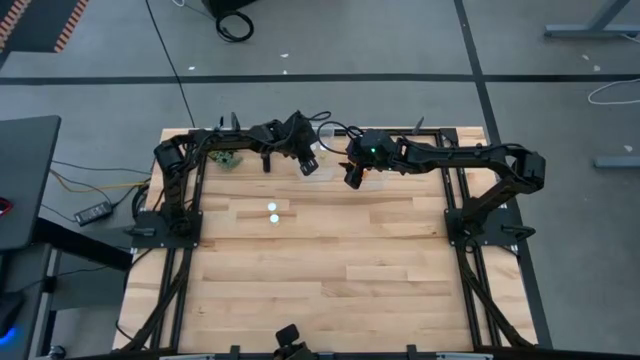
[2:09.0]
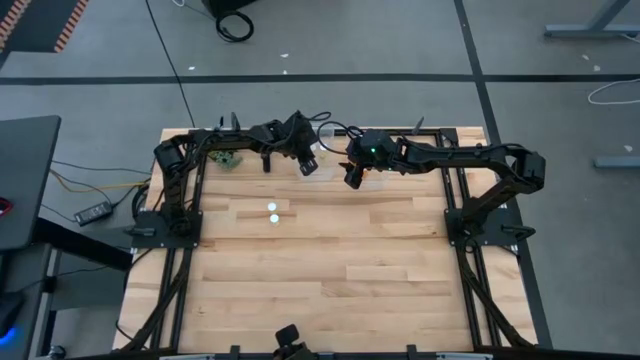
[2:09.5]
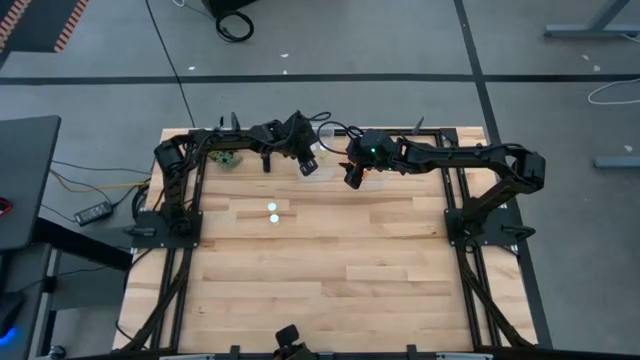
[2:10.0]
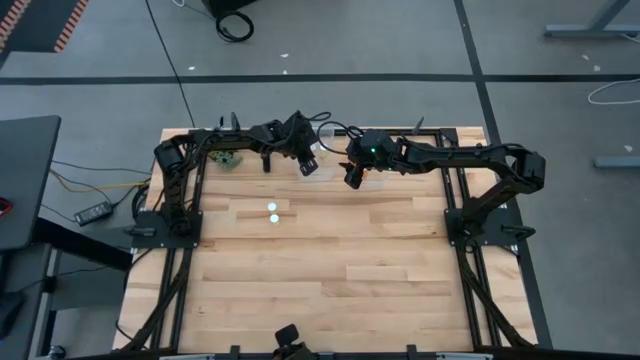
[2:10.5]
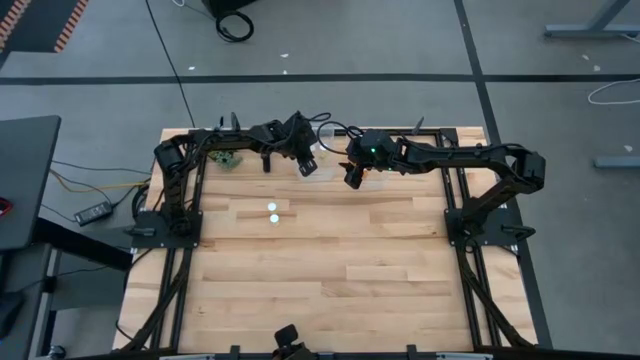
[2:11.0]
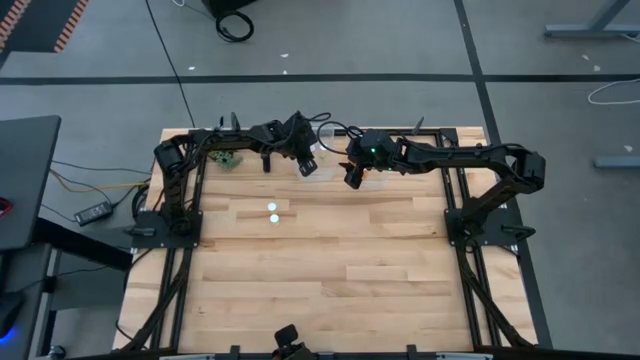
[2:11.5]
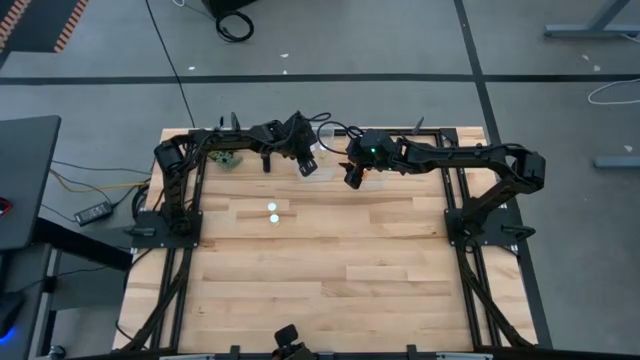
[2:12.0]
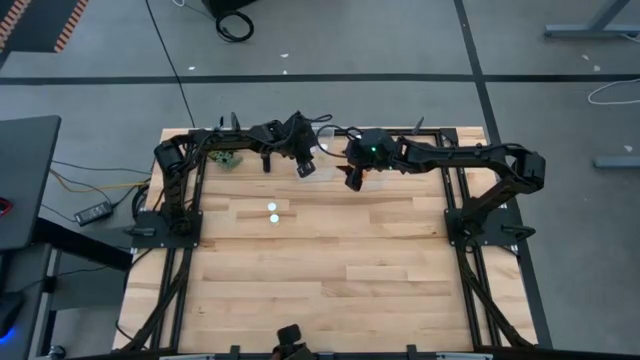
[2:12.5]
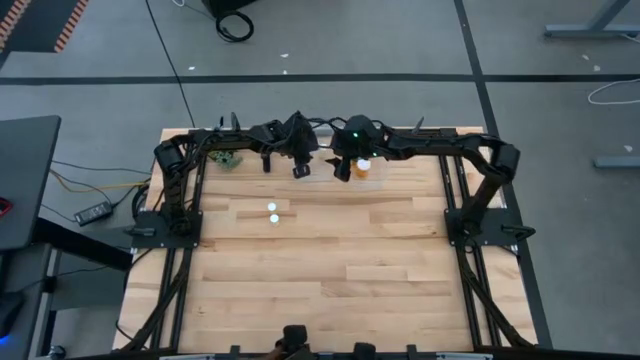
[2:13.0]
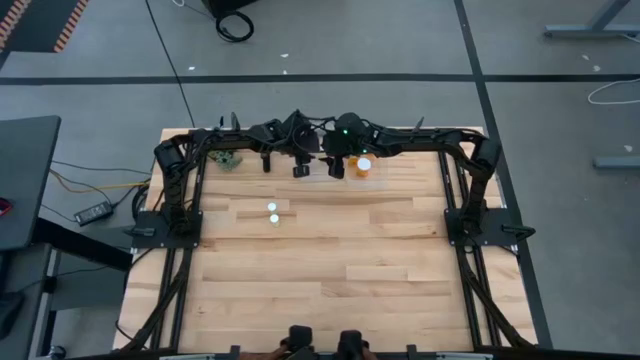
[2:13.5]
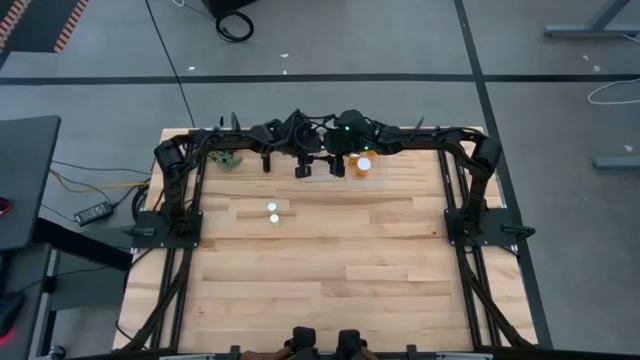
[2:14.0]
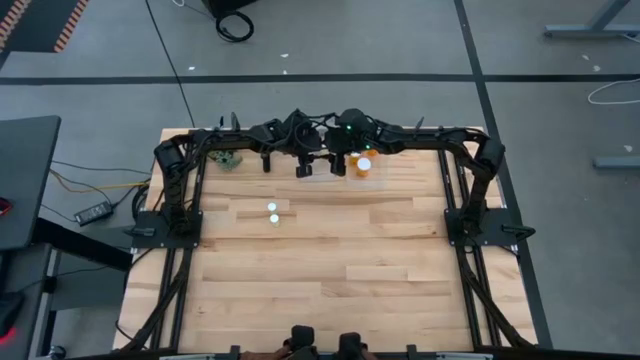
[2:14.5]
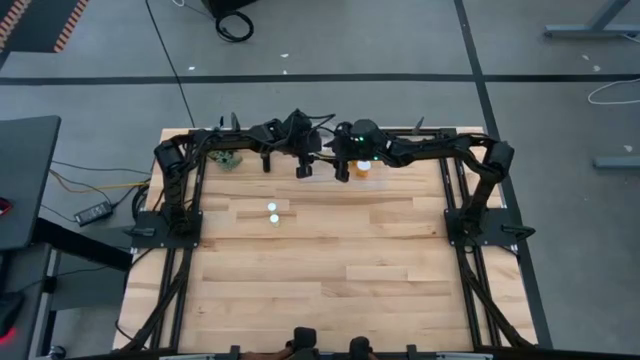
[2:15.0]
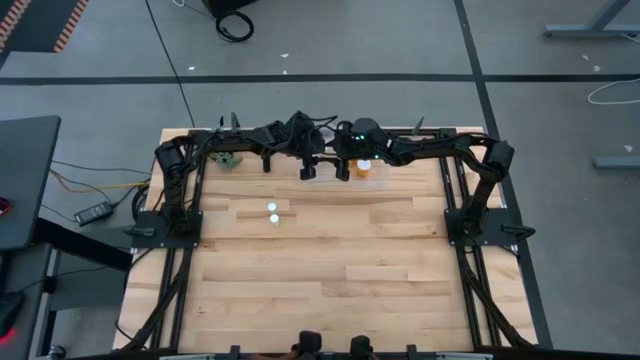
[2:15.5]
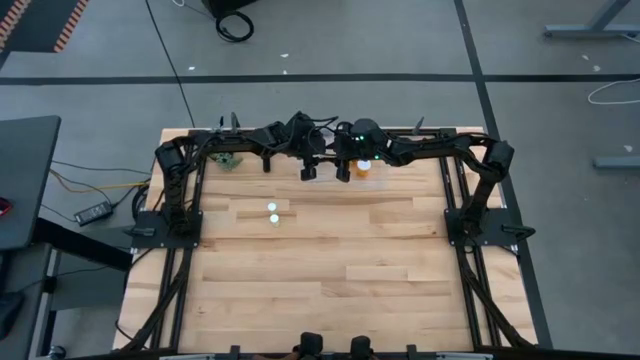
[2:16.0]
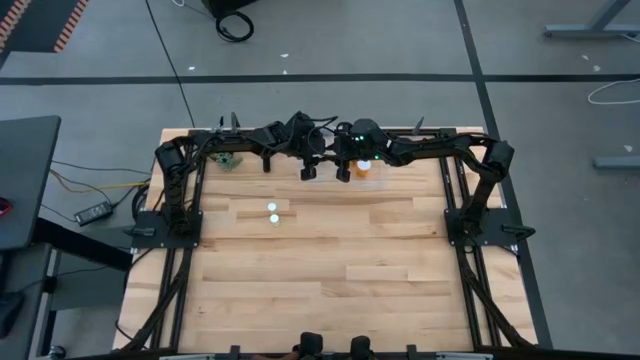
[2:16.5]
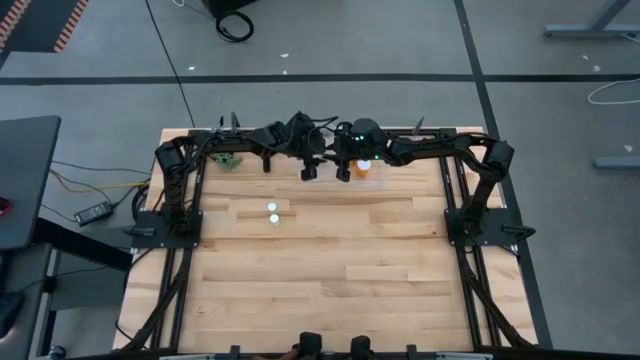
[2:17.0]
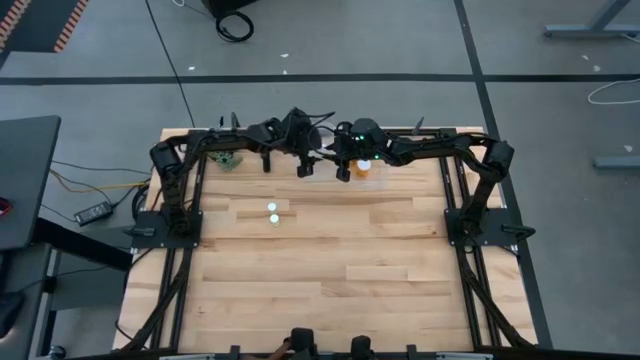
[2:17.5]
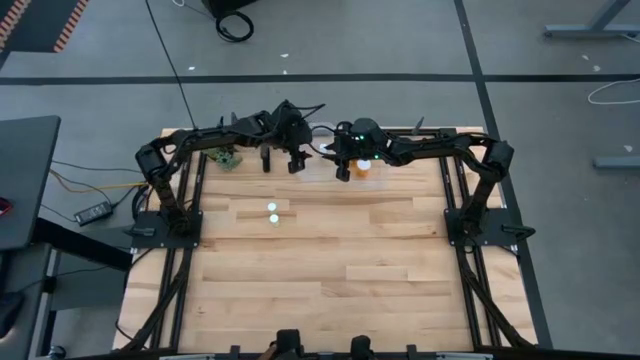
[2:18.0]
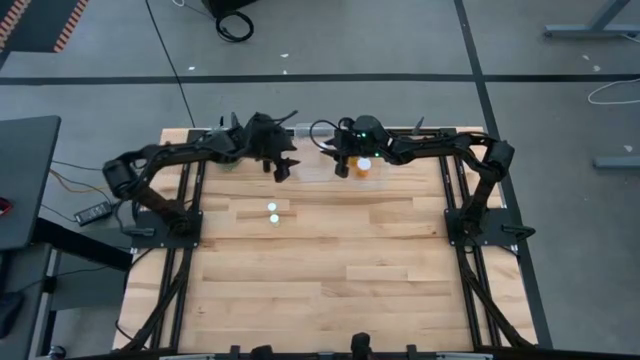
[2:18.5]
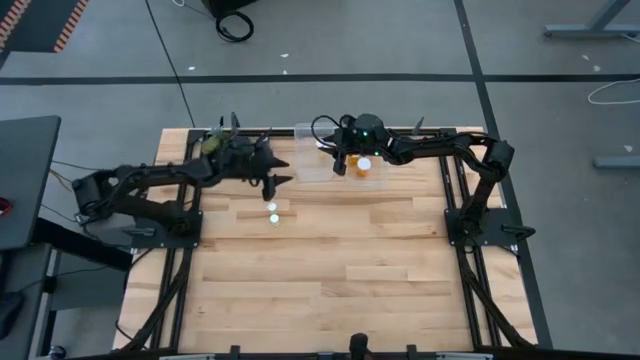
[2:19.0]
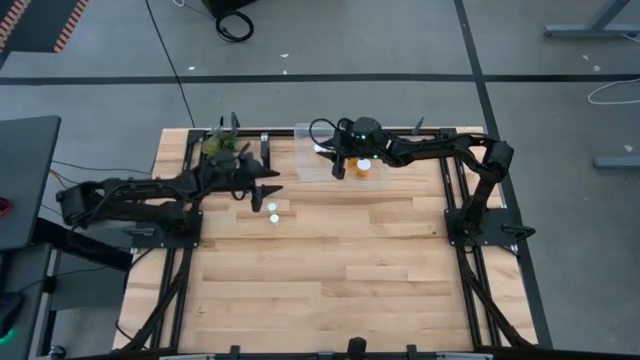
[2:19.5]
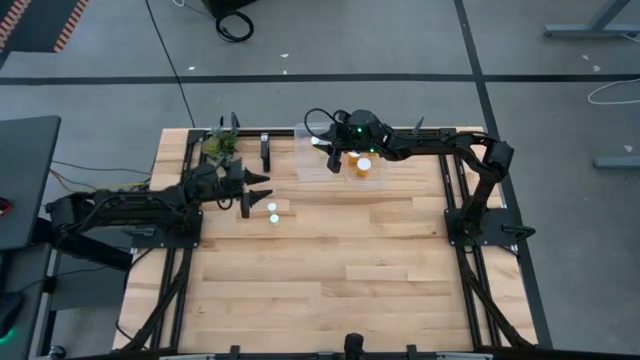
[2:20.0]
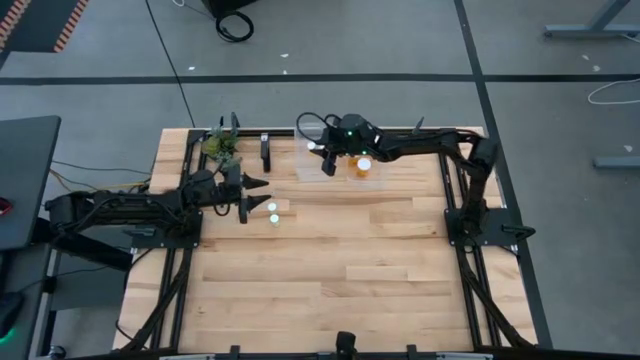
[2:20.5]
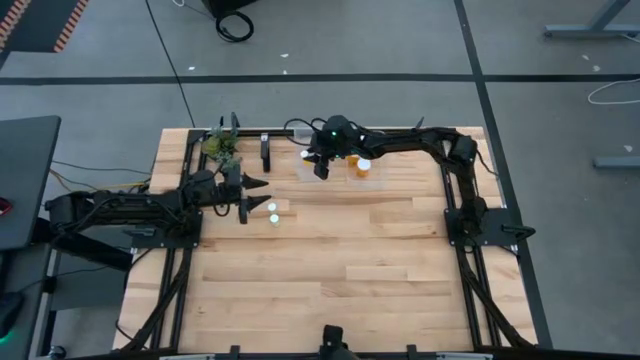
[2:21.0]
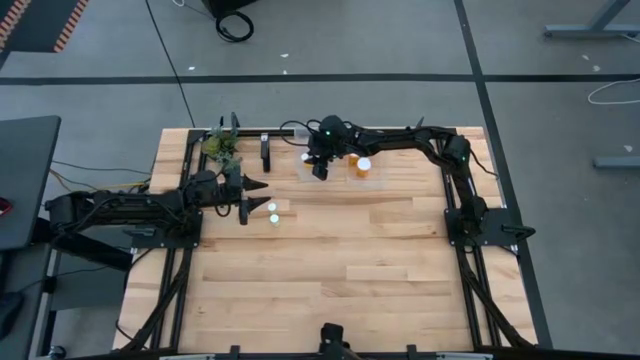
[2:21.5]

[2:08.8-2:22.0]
Task: Pick and place medicine bottles into bin by pill shape (circle, oval)
Put the small orange pill into the left transparent bin

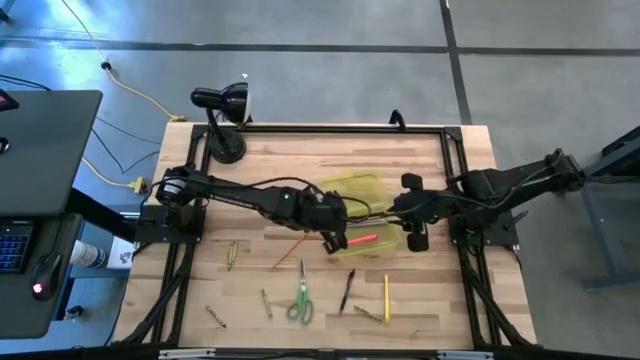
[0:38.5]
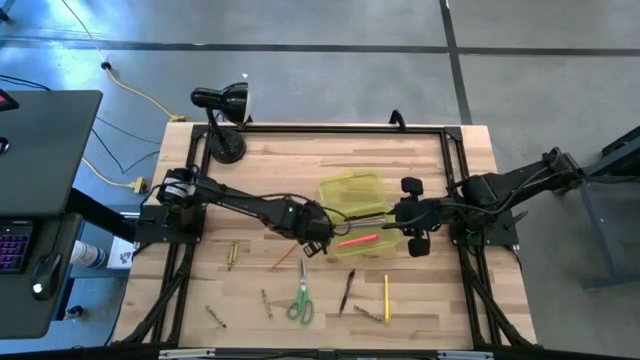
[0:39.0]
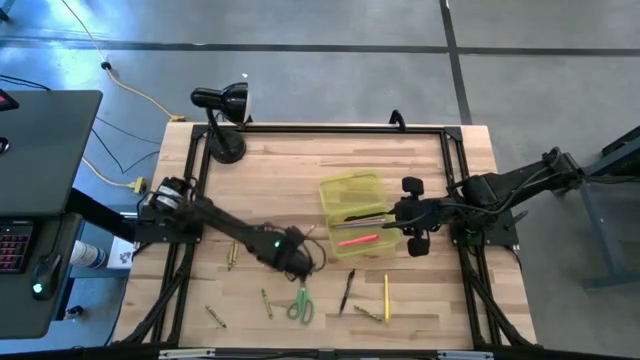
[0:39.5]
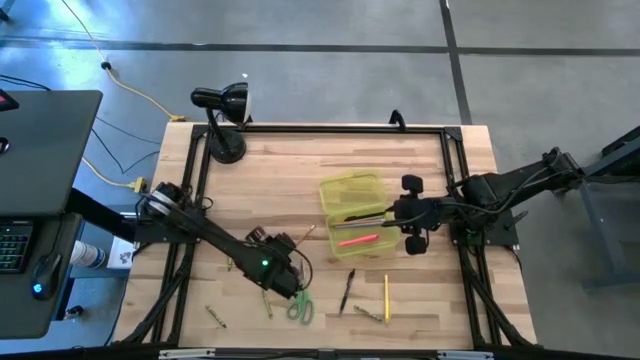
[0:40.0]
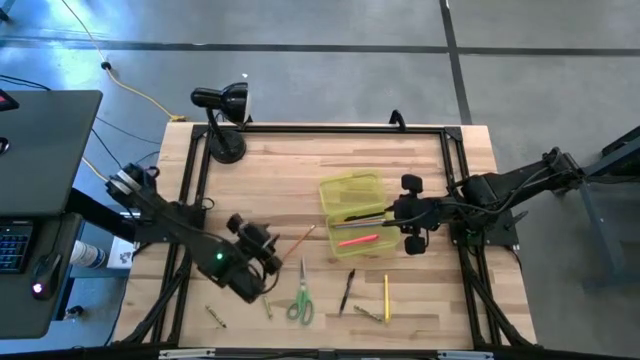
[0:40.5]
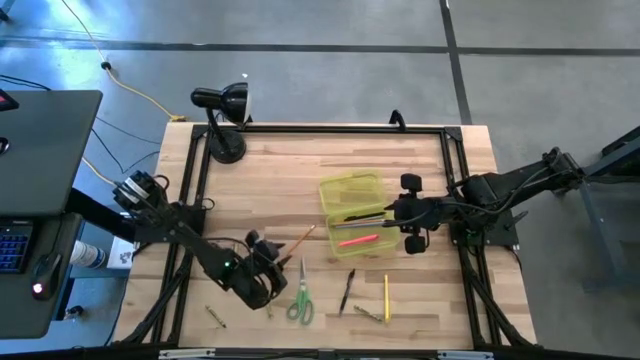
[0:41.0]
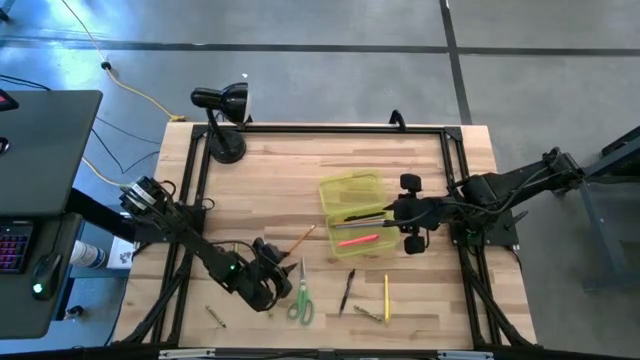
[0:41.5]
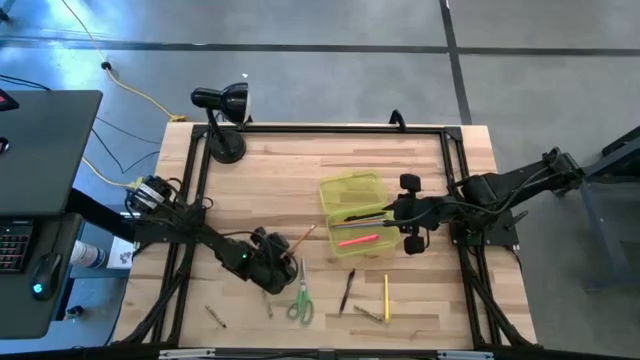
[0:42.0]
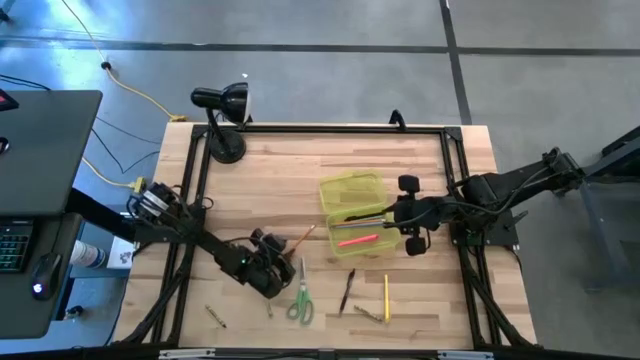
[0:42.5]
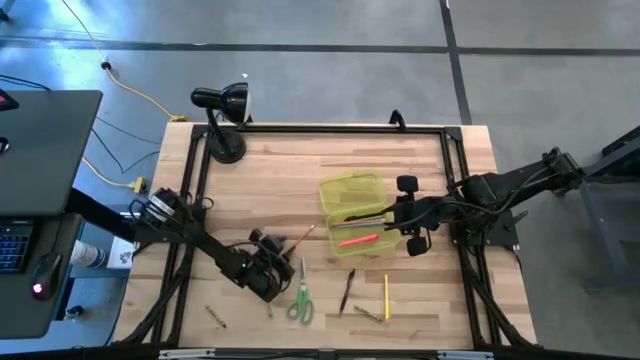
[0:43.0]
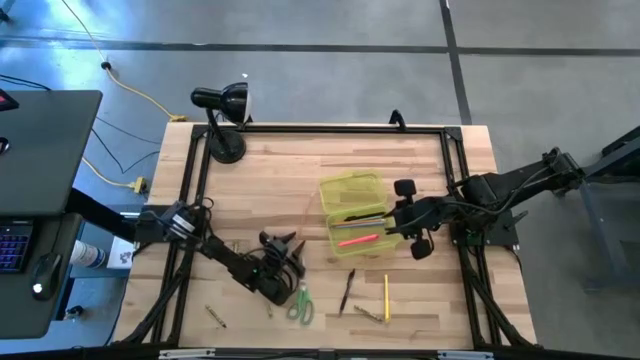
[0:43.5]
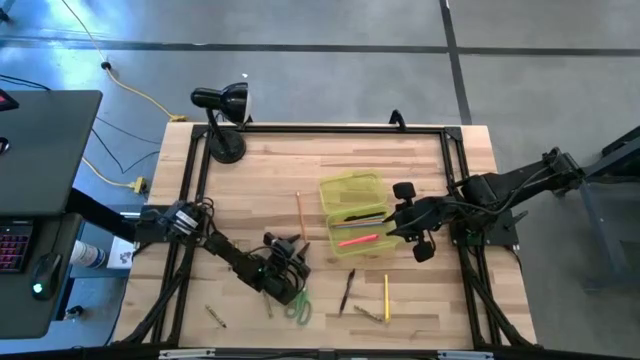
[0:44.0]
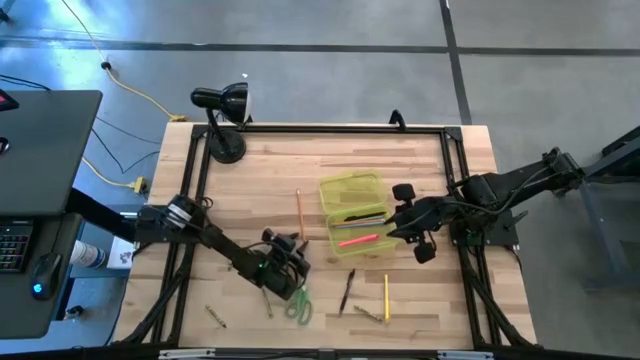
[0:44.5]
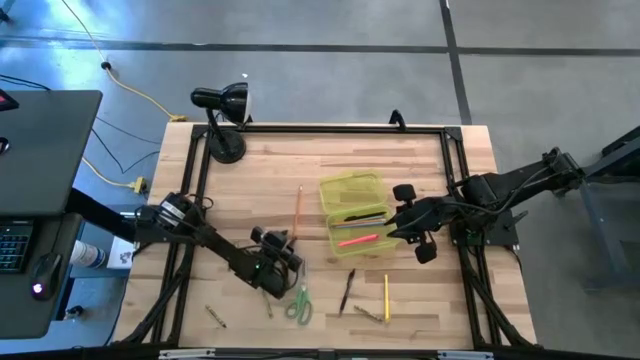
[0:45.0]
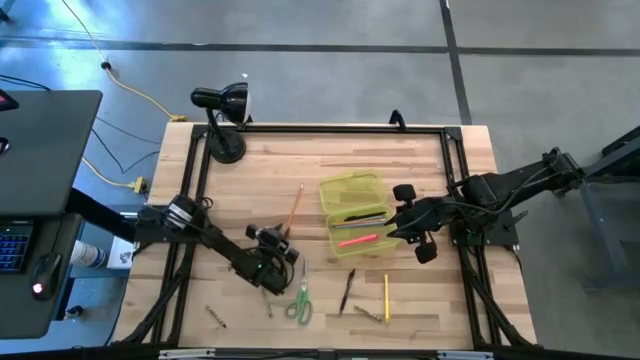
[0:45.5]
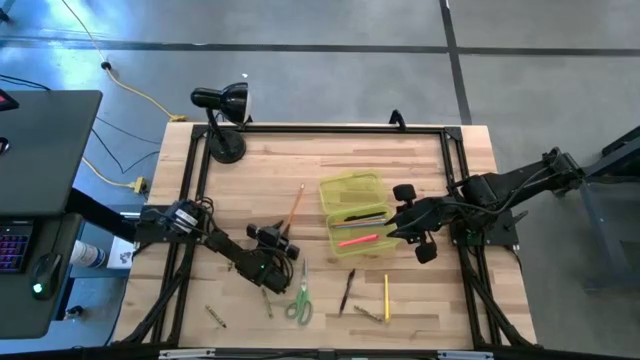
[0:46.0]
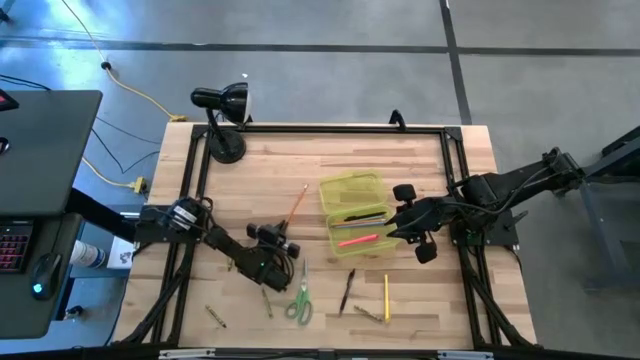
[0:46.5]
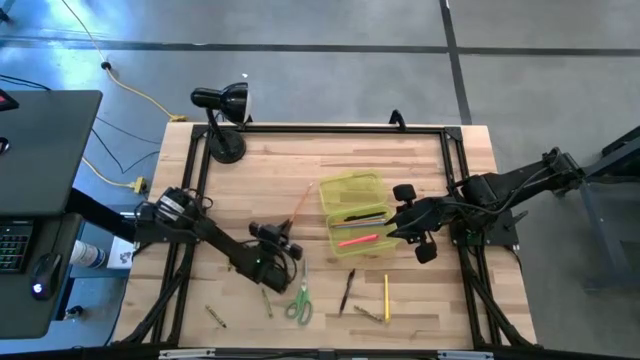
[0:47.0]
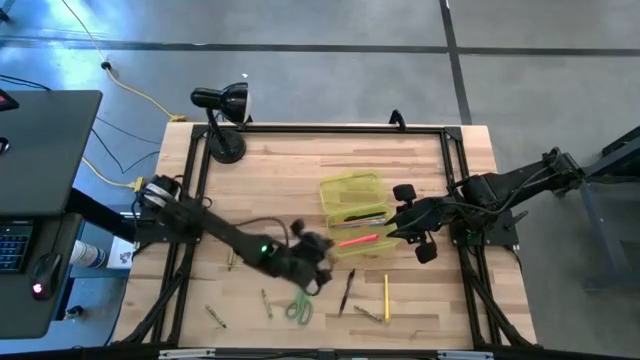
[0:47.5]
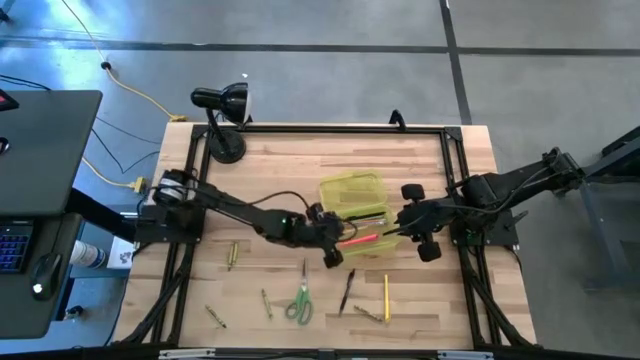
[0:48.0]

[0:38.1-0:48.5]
Task: Pick & place school supplies into a supply box
Put the orange pencil into the yellow supply box
